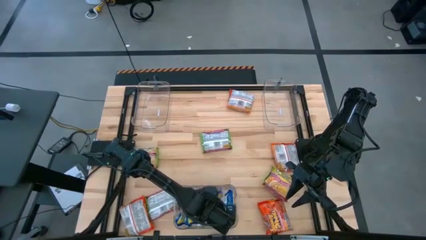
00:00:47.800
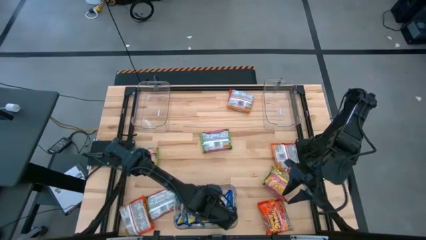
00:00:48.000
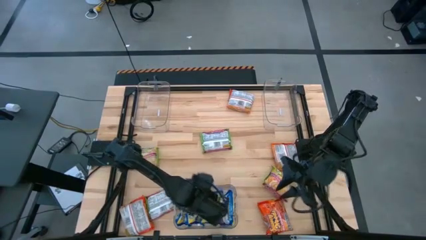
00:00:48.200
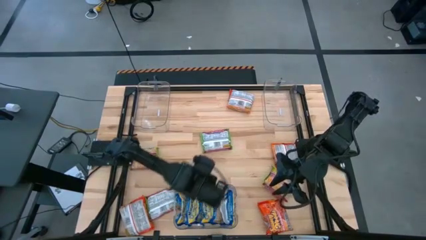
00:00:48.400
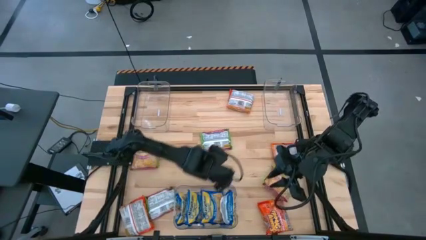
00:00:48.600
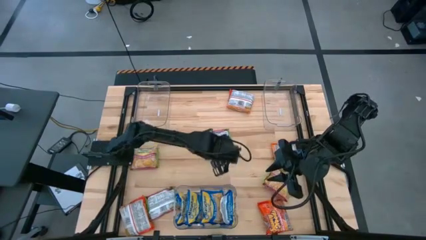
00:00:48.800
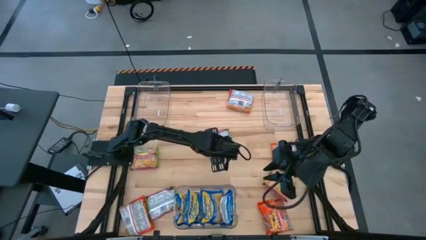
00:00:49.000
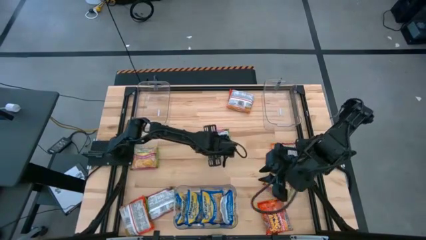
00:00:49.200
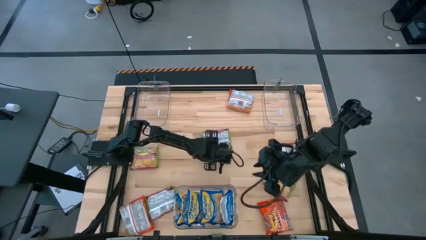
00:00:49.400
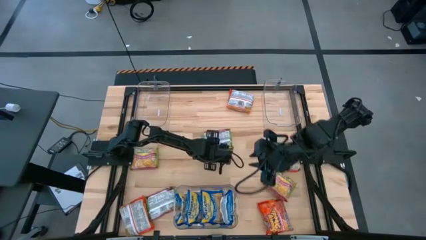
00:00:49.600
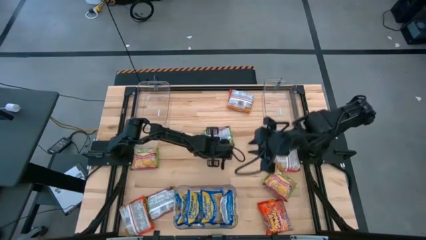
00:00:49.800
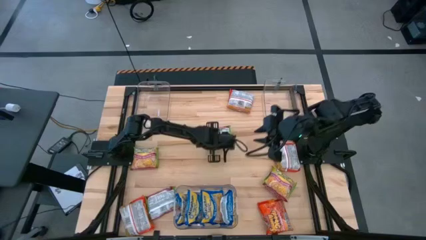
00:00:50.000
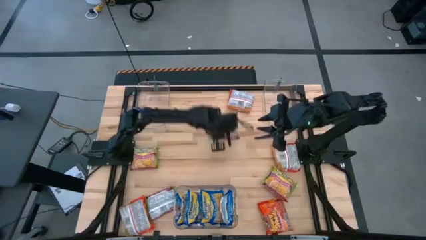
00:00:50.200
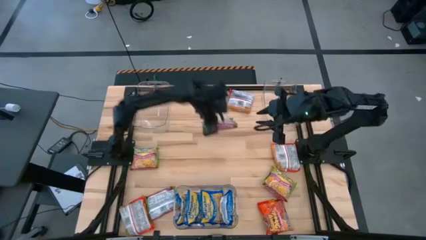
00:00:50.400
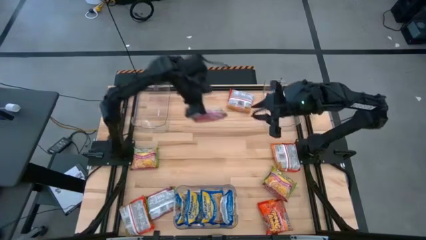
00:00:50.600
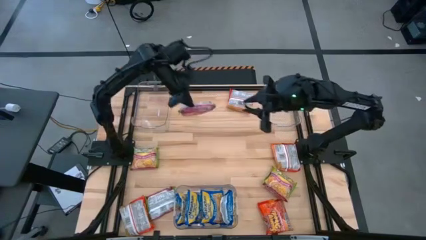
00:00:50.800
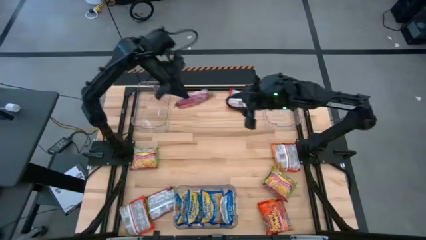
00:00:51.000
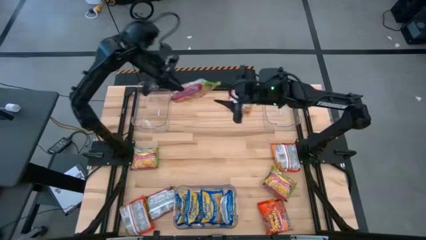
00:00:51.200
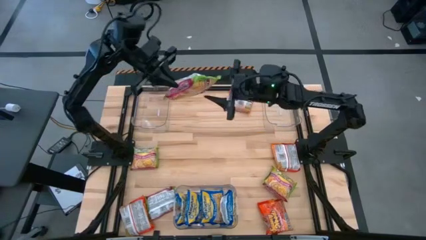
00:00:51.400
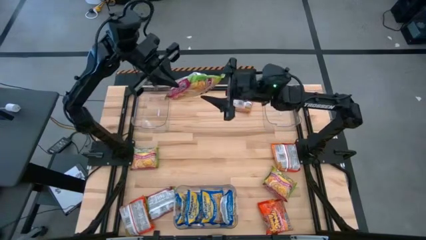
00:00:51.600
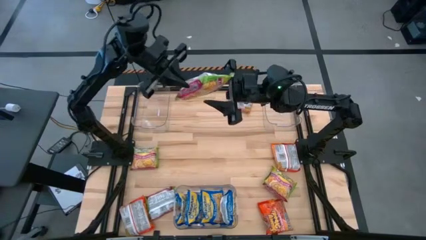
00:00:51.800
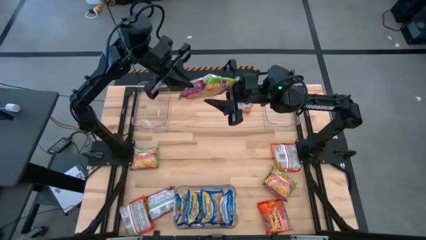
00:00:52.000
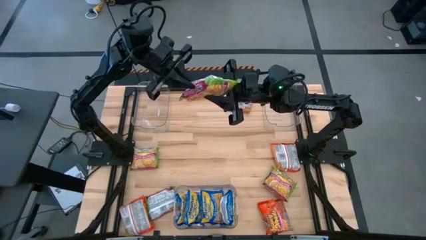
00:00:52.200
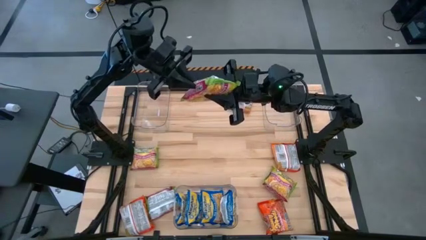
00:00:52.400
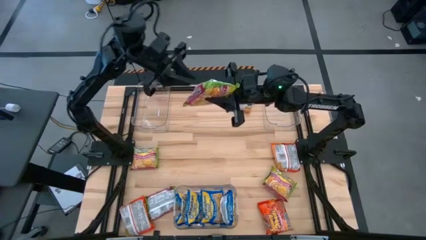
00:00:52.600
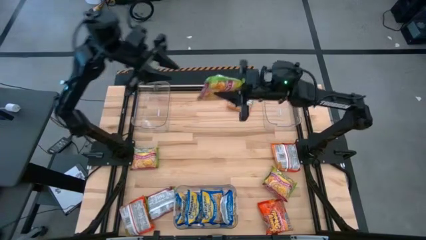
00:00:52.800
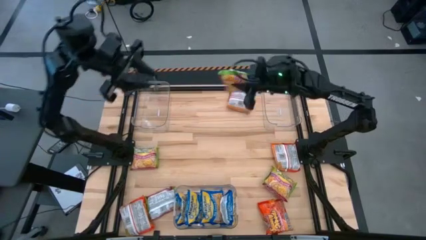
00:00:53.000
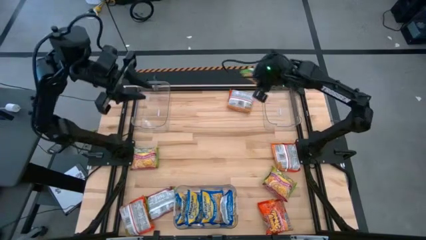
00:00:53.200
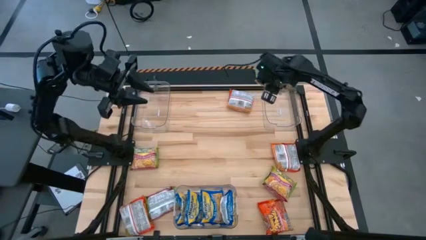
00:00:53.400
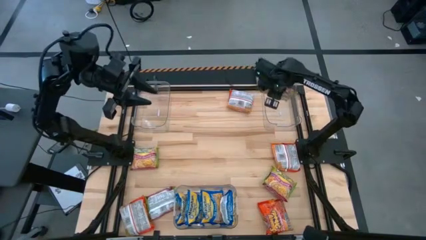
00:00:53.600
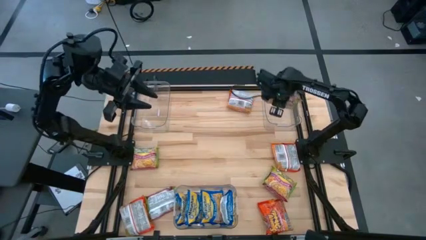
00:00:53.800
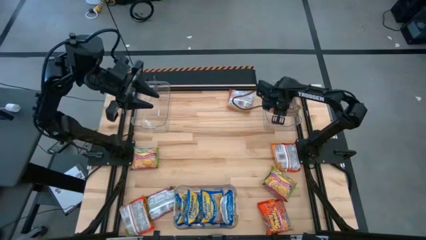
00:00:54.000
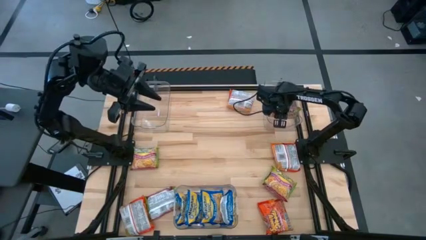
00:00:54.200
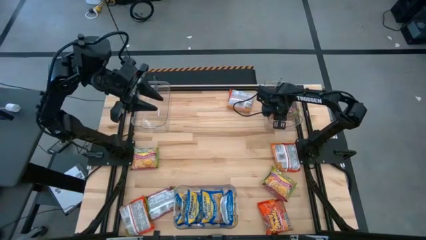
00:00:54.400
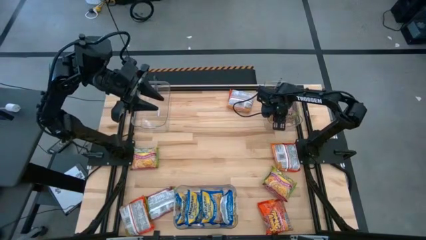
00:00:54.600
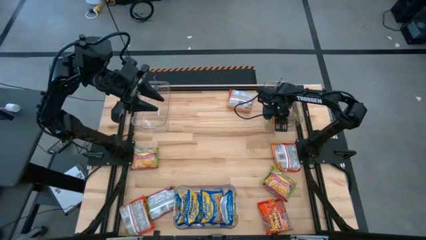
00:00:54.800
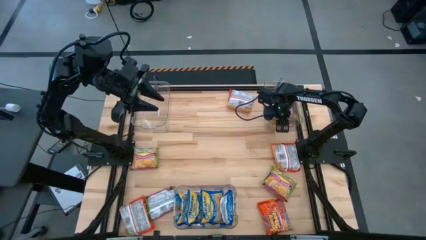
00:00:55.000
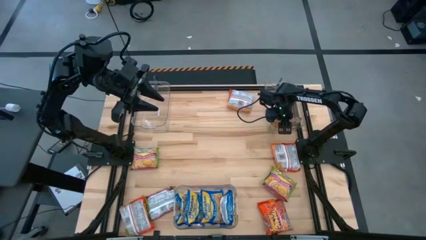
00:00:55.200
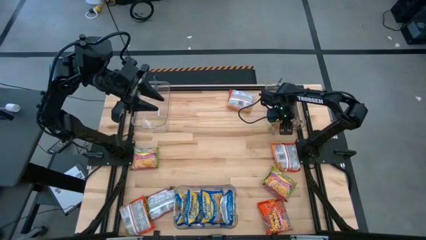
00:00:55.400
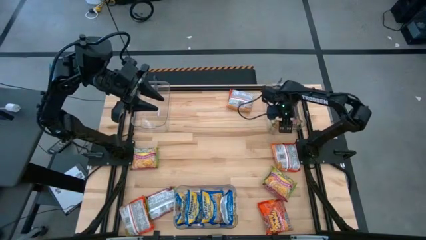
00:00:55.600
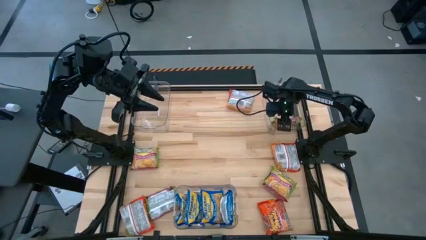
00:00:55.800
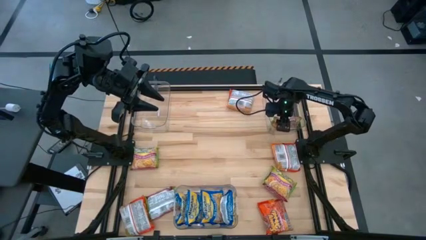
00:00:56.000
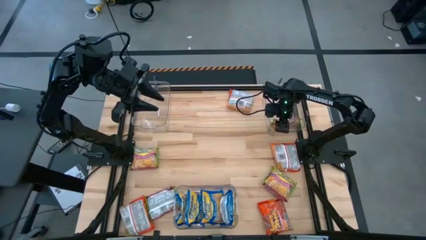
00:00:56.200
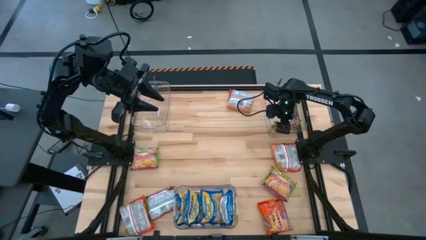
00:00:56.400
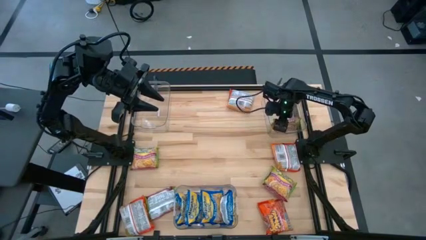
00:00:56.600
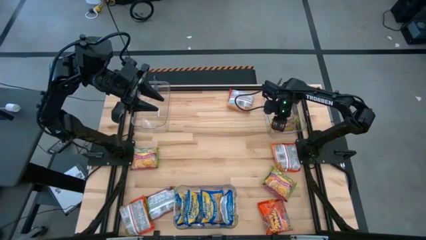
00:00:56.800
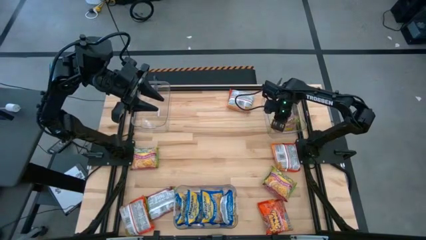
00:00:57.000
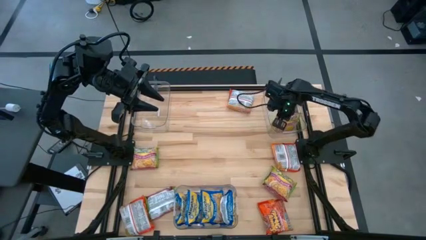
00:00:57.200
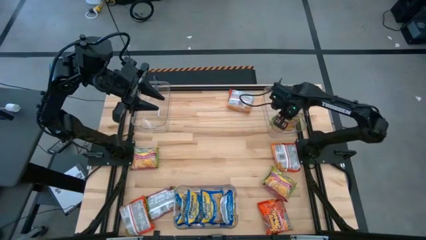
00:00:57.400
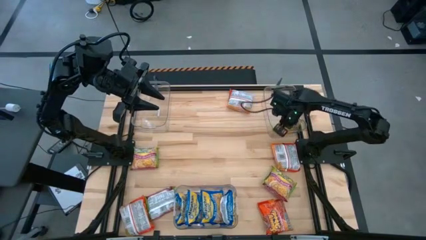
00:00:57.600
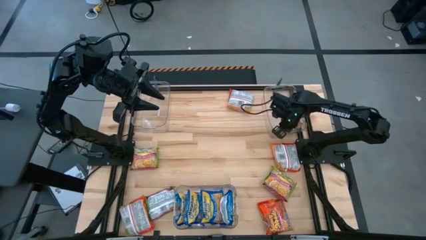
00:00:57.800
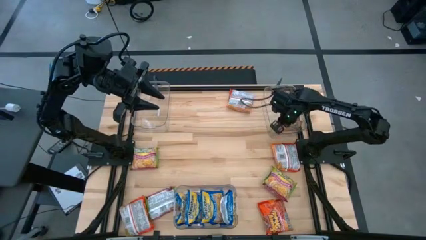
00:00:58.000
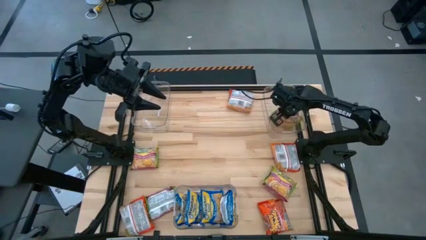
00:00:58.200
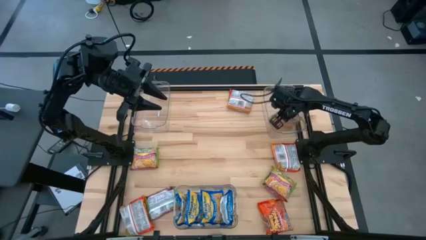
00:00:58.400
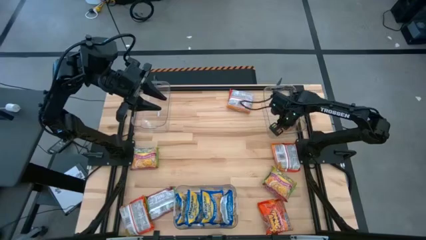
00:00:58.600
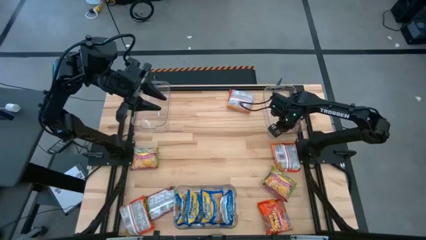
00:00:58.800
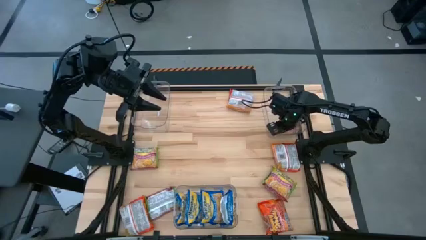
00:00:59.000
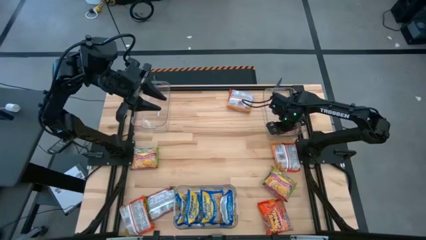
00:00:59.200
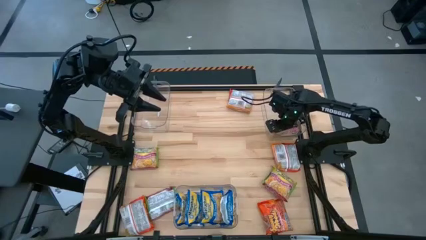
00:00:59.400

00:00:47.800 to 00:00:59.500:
Task: Sort Maruchan noodles
Put the green noodle pack into the top right transparent bin

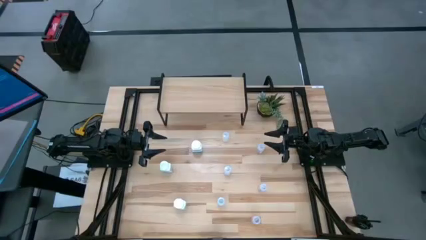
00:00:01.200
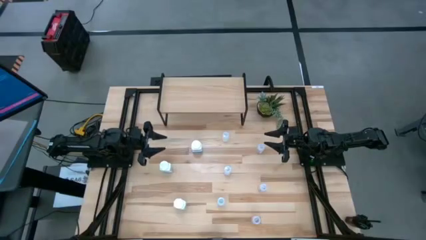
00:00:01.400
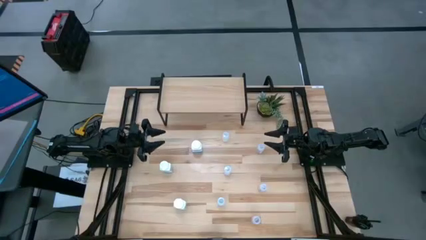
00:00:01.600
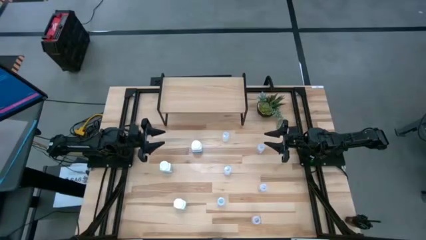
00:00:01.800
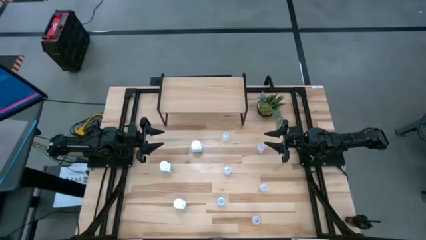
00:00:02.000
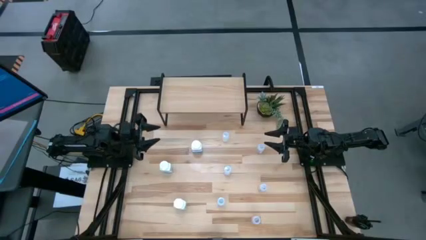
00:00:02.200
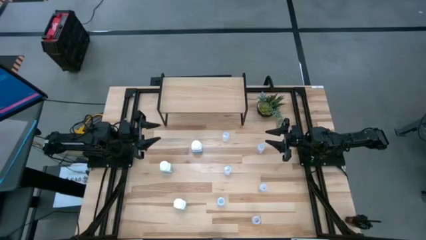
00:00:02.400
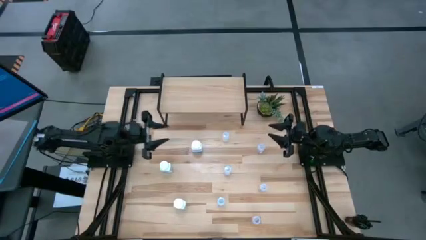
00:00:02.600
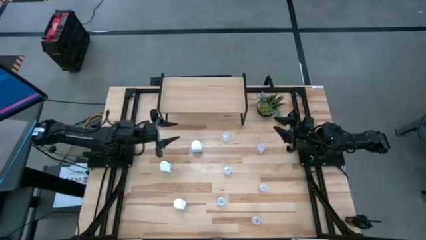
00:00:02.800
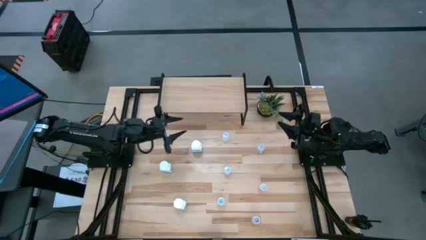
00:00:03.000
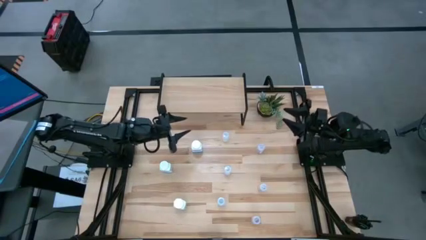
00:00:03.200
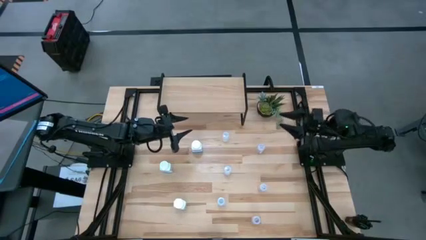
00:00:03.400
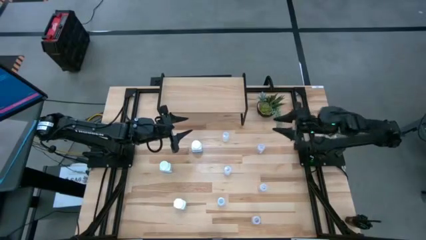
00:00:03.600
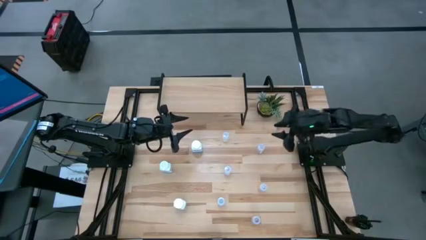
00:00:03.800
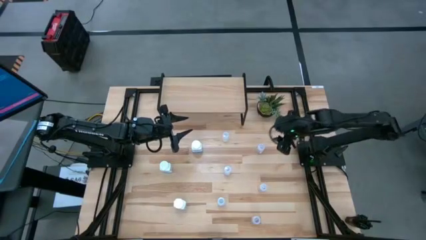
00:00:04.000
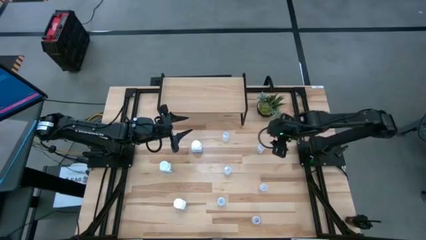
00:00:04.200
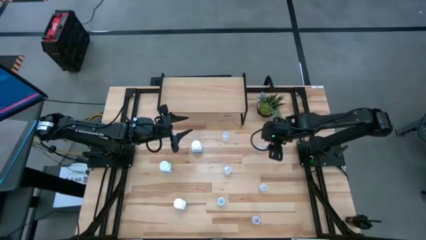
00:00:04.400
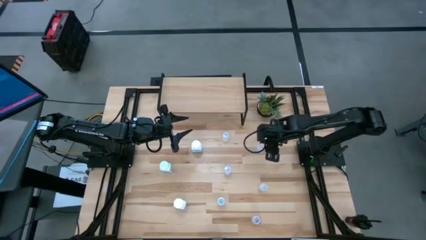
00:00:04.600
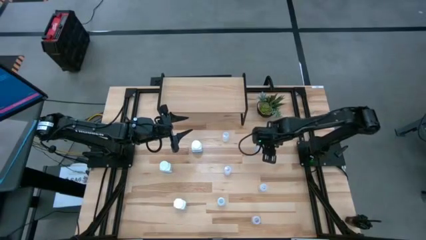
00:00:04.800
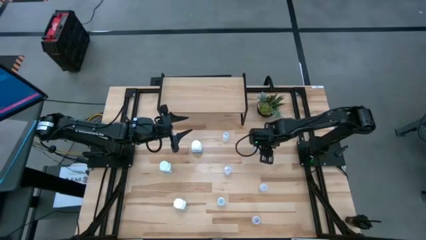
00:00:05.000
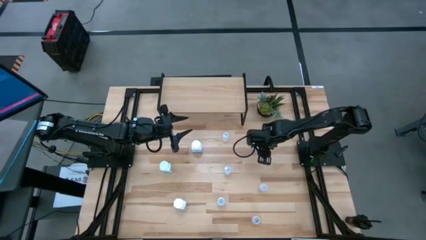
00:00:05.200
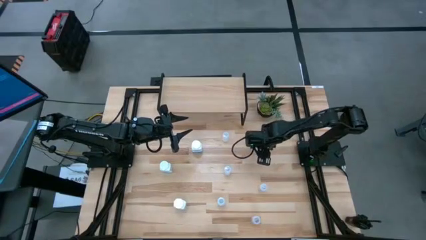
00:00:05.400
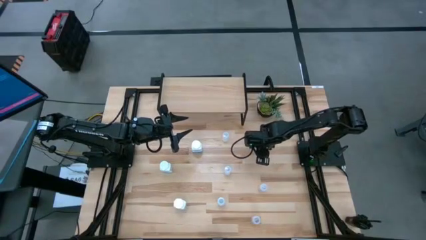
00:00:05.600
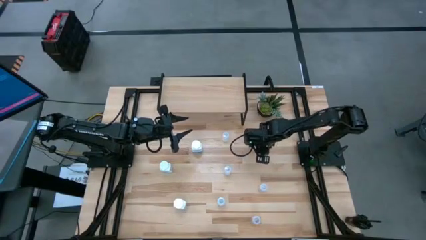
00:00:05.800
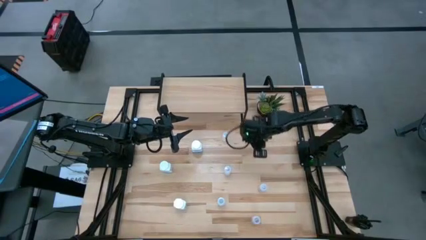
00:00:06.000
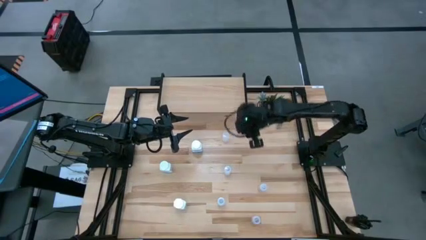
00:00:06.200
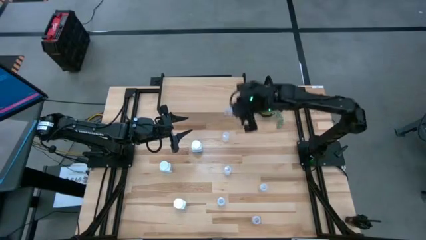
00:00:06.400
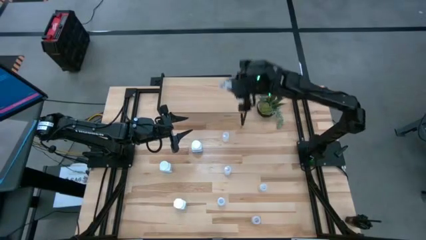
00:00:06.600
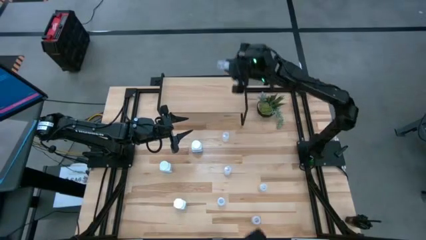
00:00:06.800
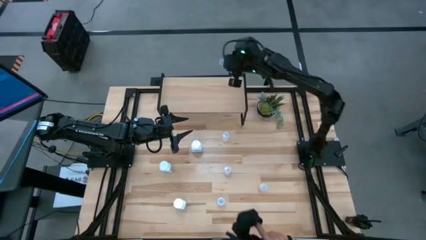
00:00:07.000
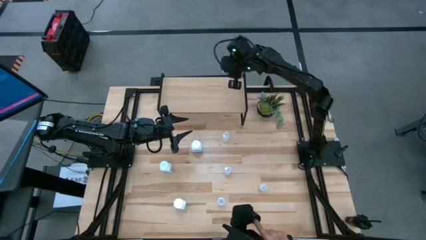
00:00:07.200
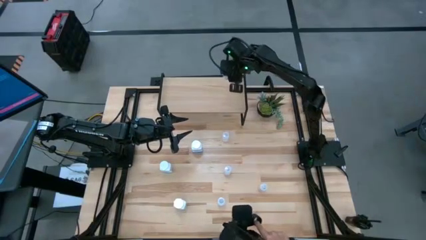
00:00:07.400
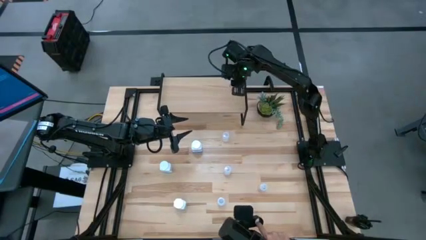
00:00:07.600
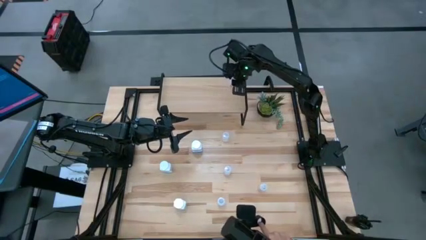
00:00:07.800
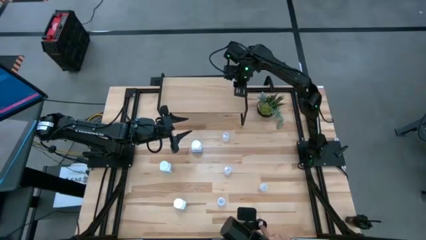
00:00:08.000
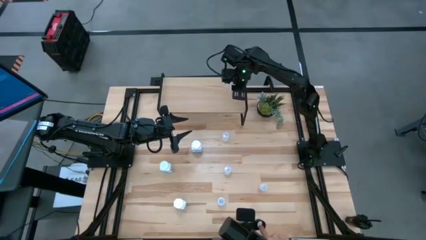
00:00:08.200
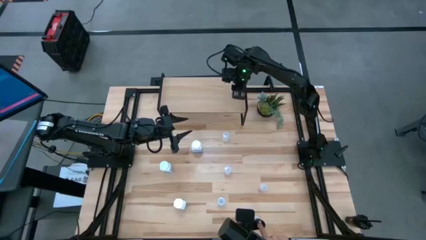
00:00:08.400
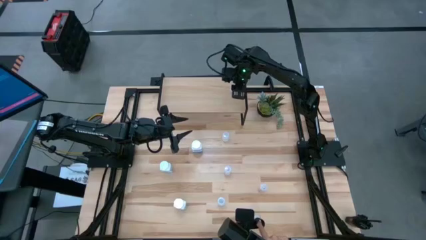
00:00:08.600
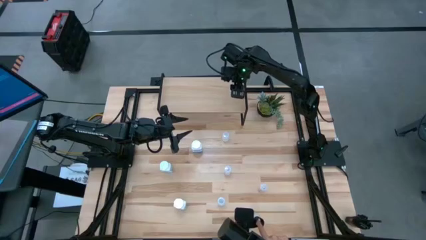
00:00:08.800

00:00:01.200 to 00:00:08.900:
Task: Pick and place medicine bottles onto shelf by color
Put the transparent pill bottle on the shelf
